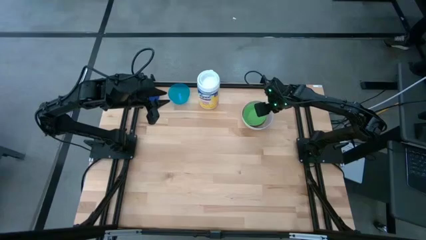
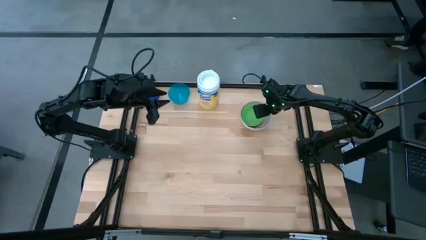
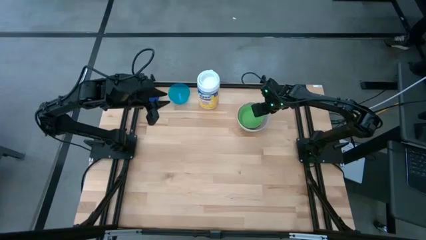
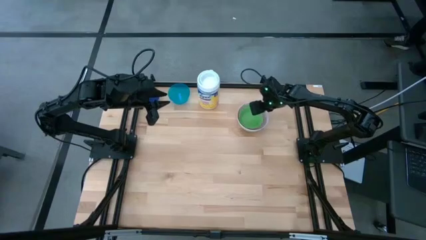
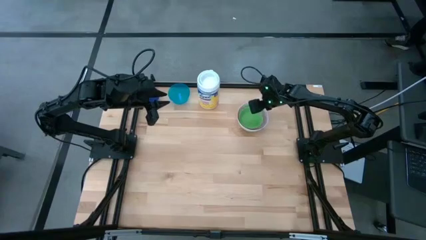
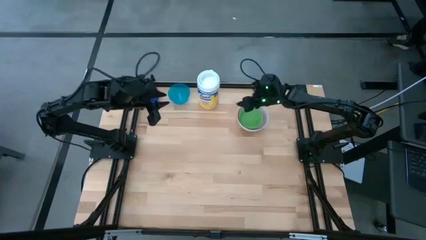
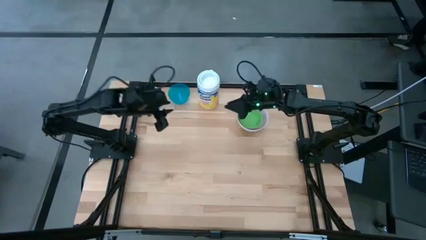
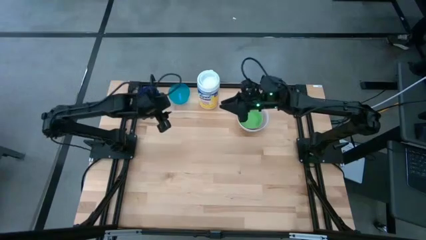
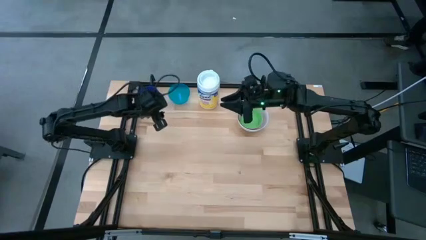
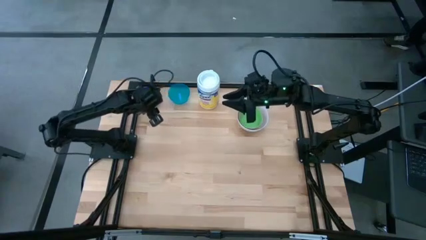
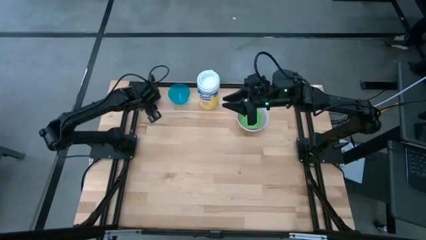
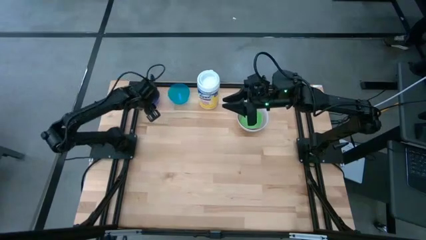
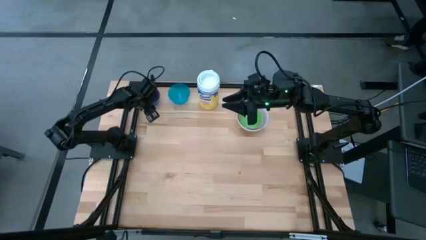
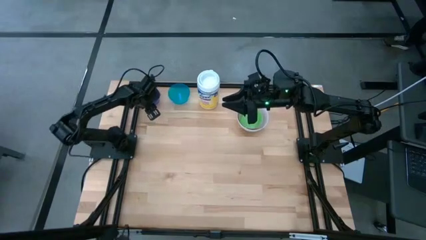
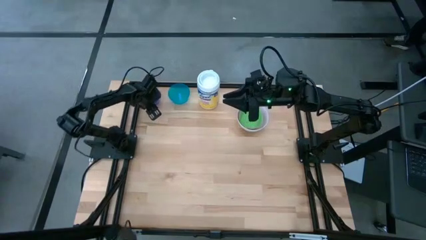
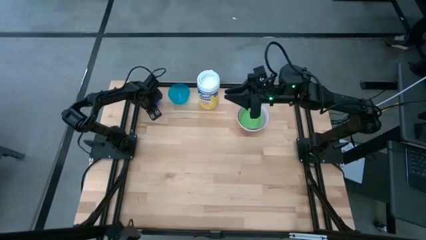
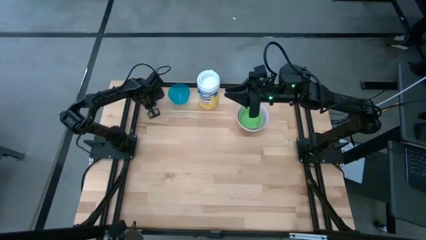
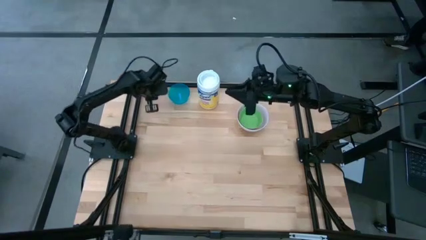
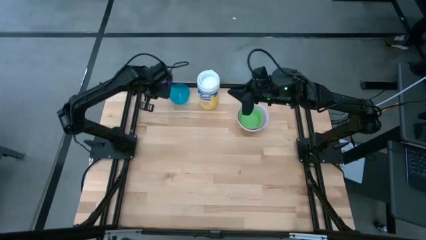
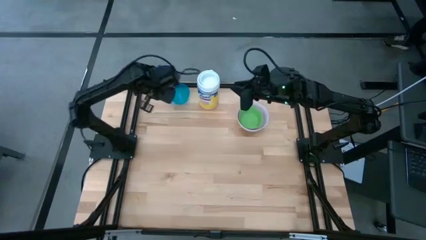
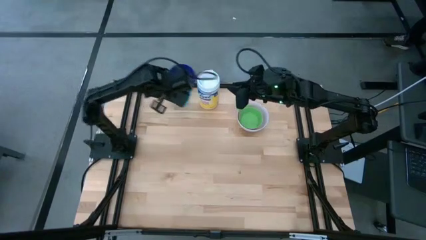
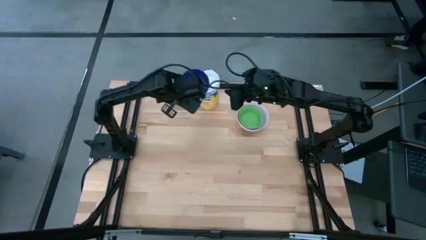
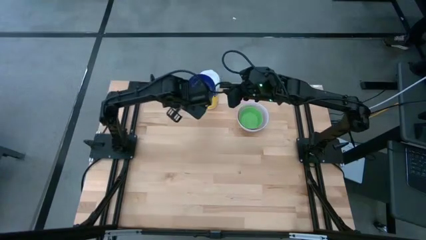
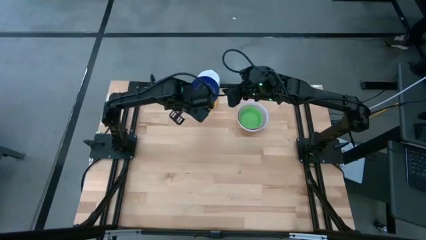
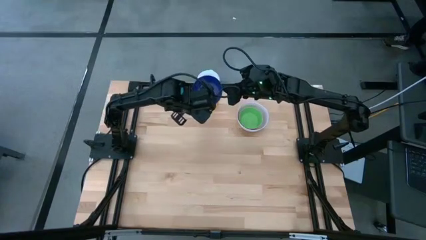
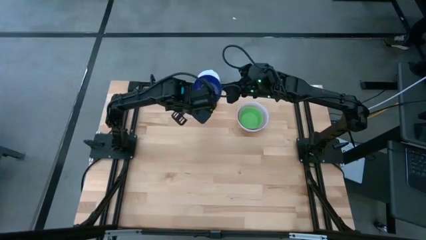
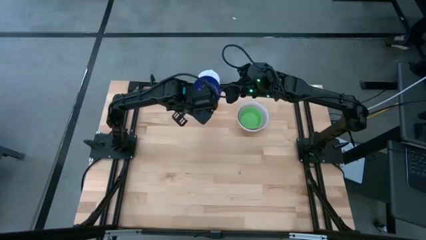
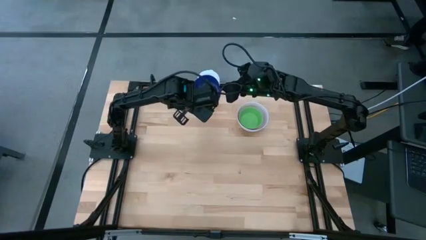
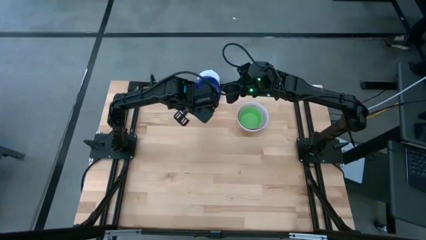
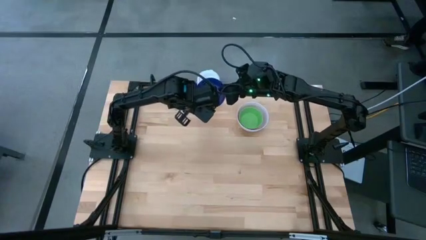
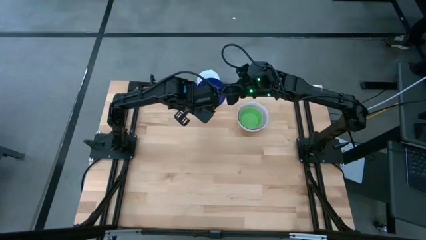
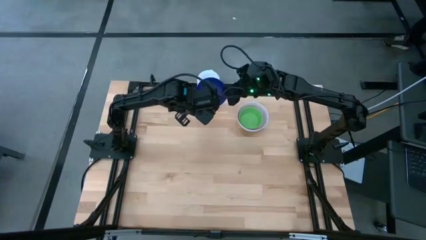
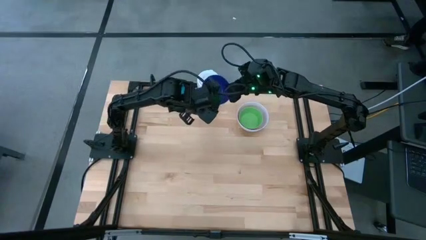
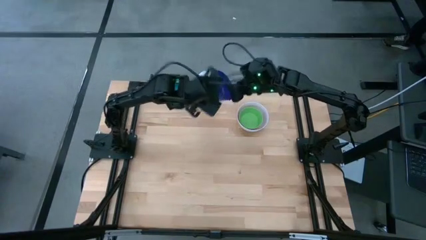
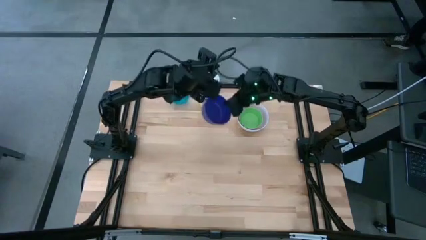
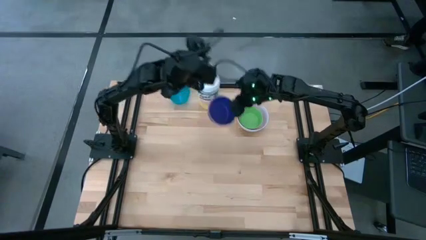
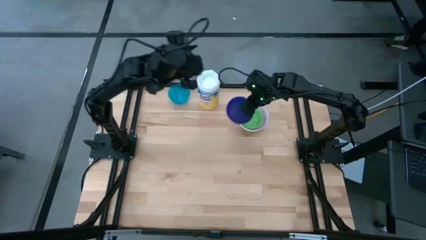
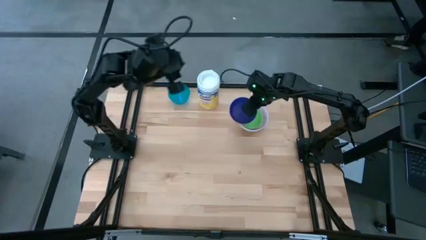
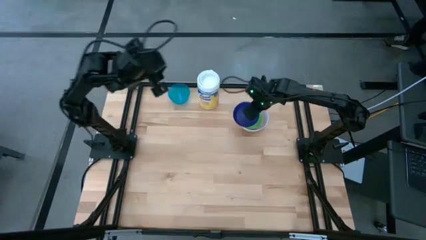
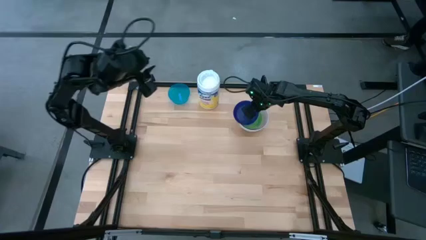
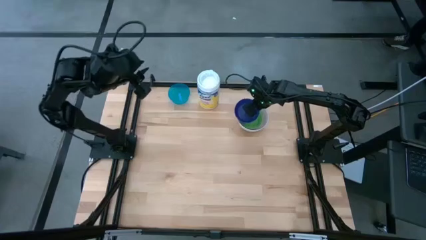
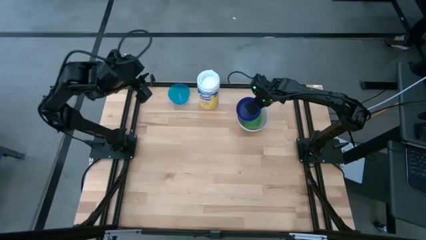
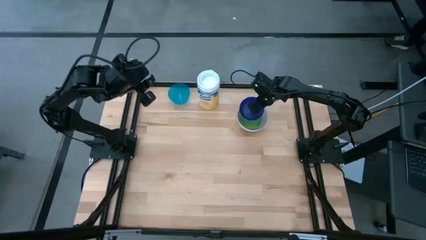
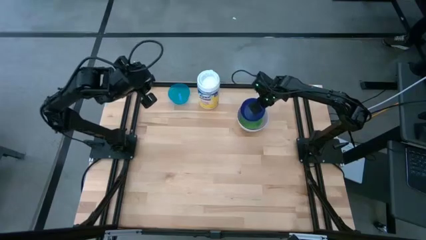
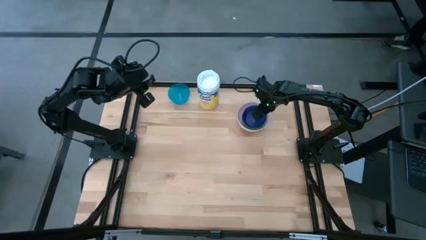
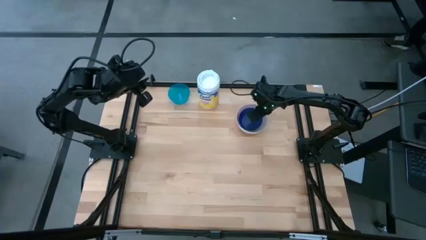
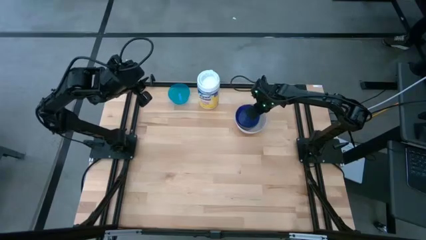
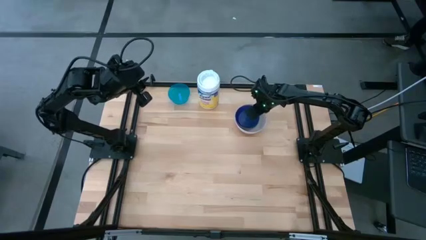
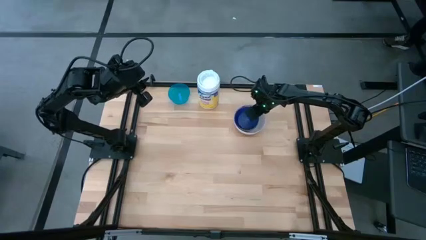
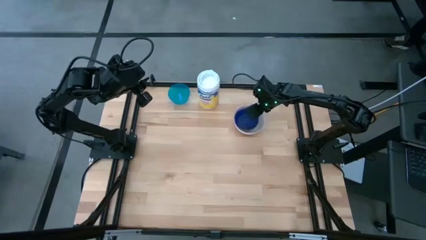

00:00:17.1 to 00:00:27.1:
Stack the blue bowl on the green bowl

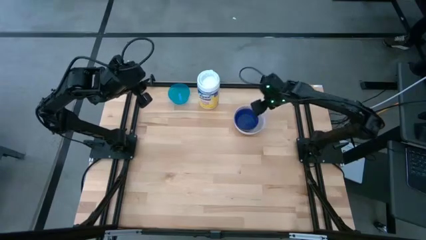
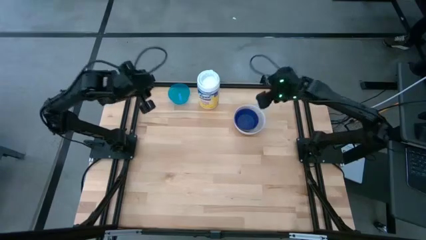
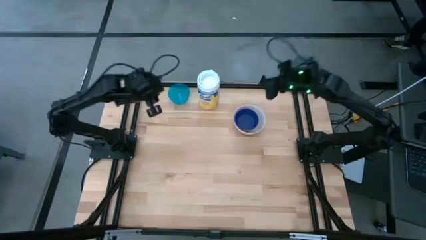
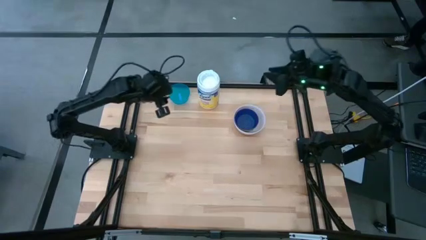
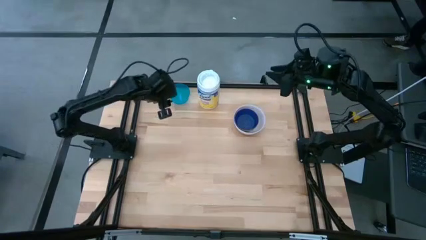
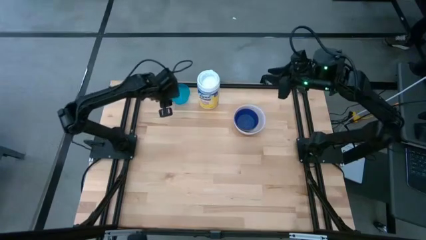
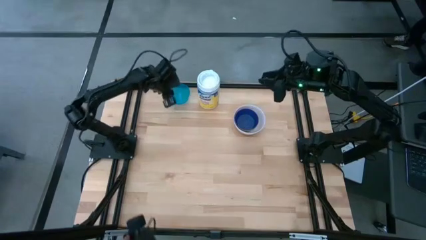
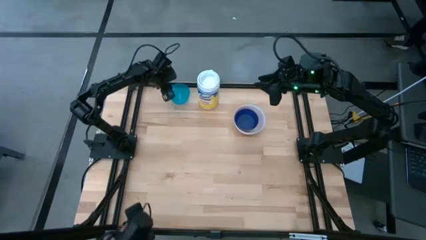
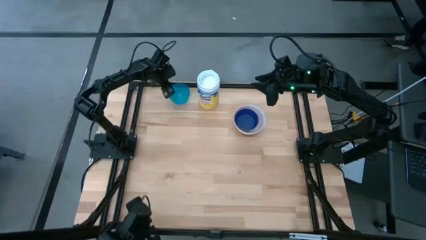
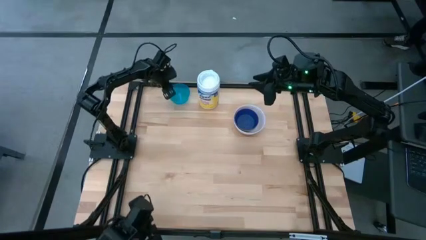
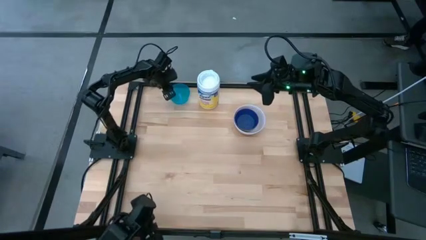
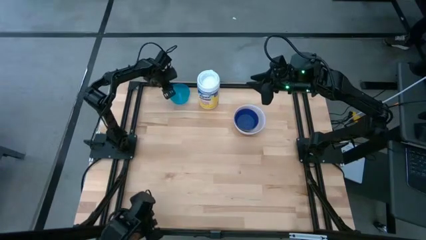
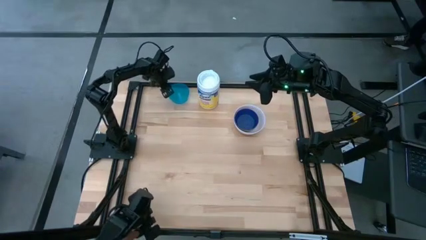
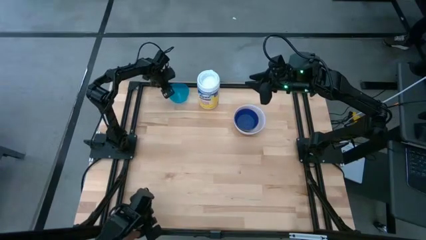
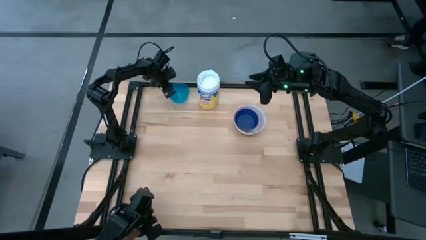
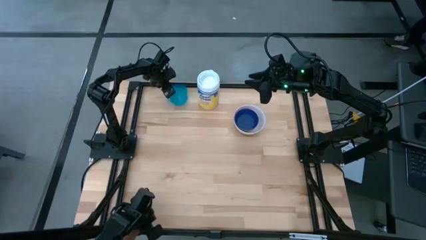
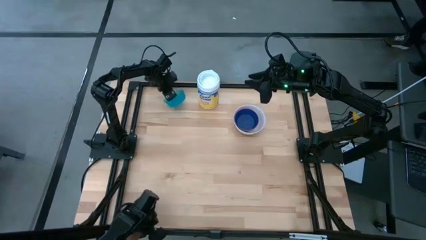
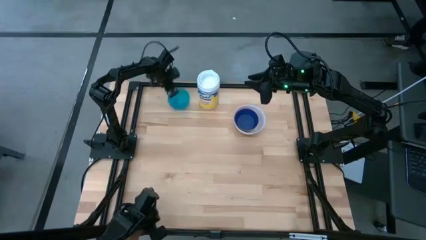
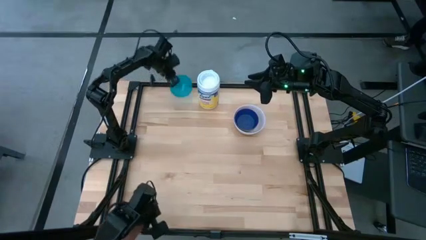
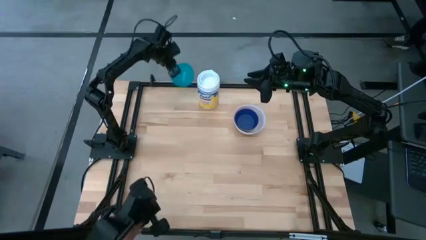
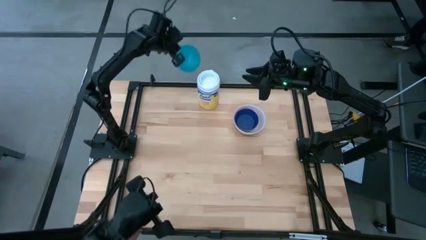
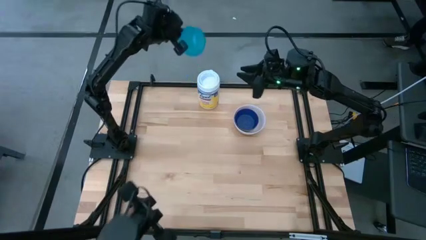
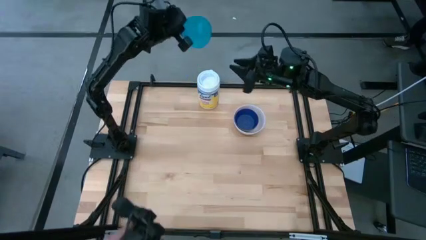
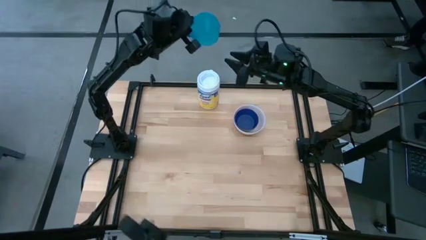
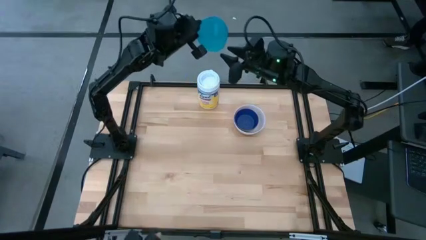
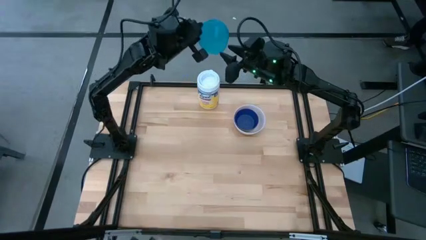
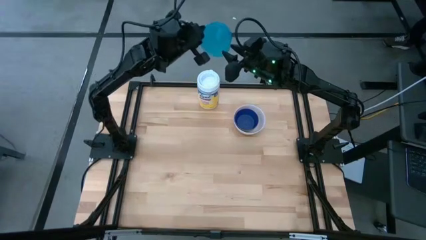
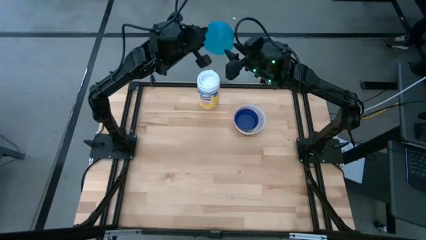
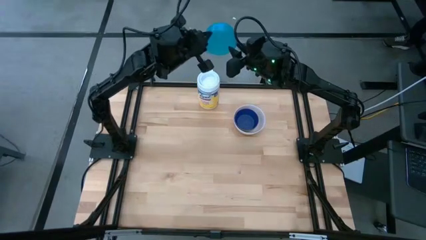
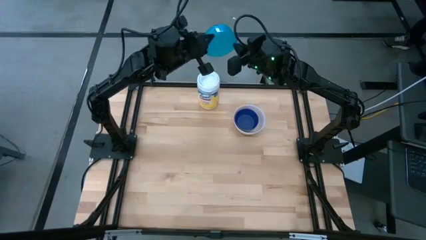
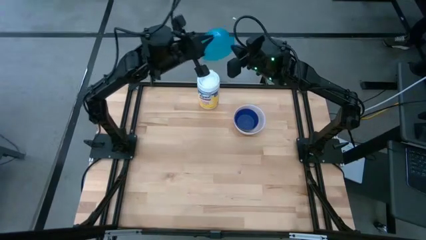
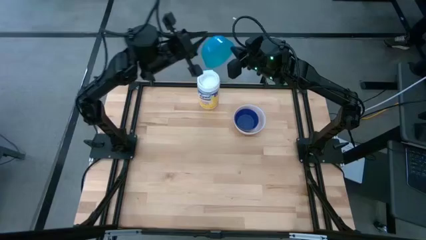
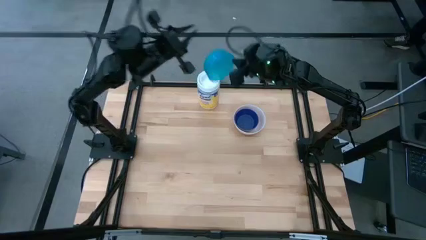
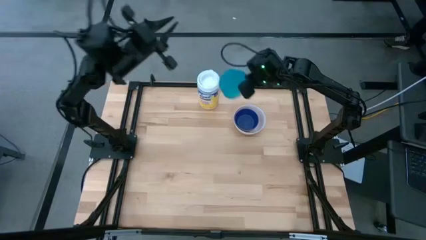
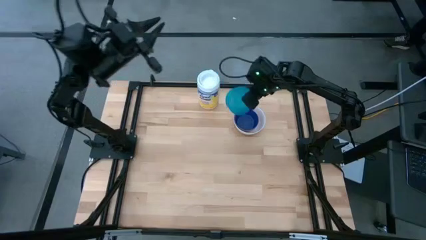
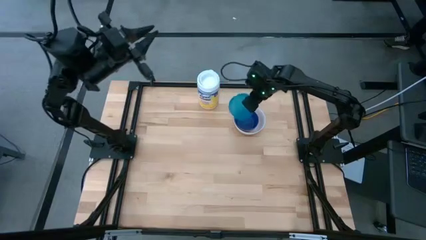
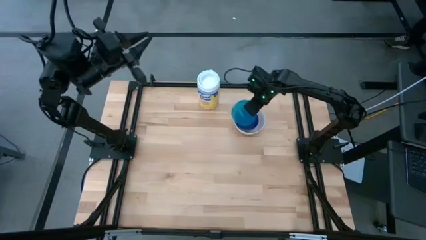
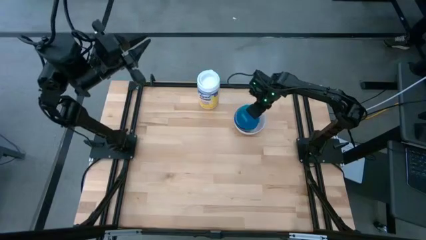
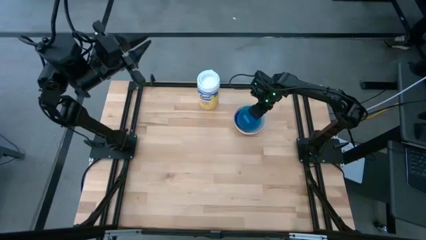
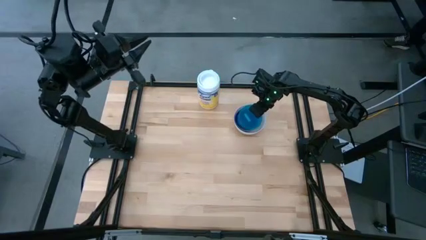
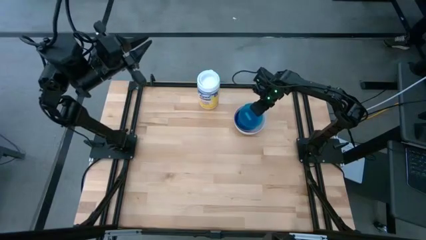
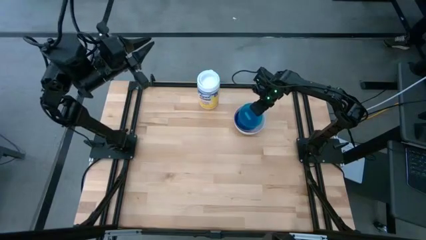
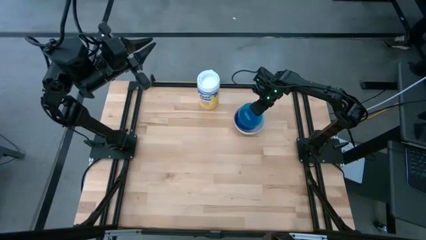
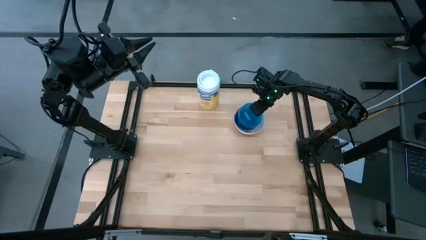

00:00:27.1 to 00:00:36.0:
Stack the light blue bowl on the blue bowl
